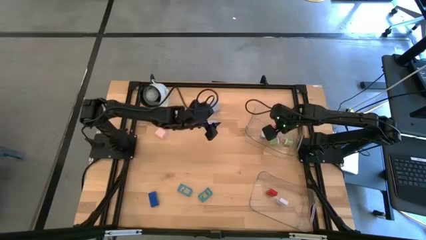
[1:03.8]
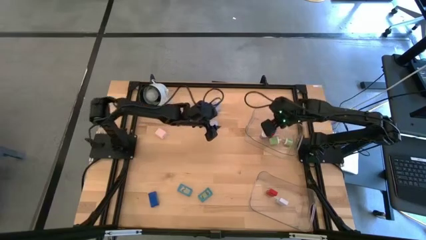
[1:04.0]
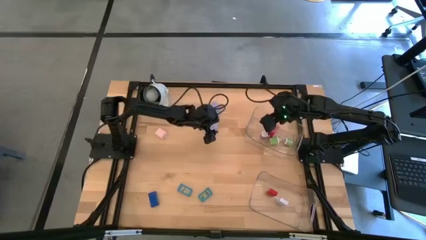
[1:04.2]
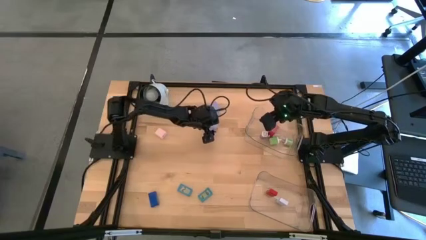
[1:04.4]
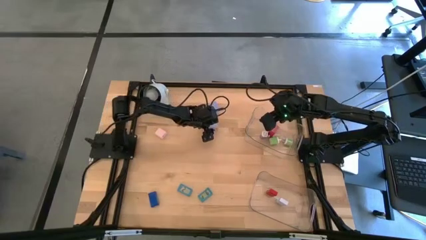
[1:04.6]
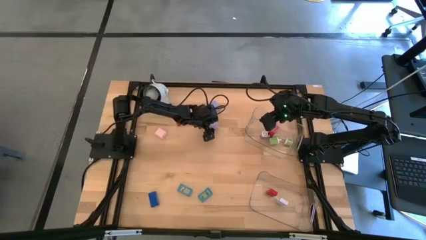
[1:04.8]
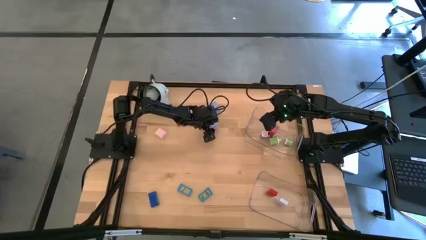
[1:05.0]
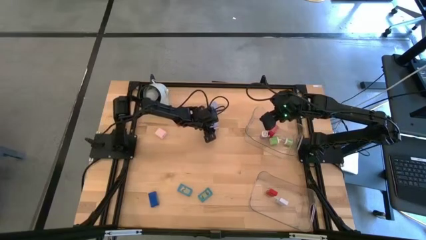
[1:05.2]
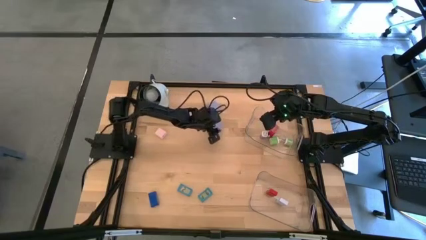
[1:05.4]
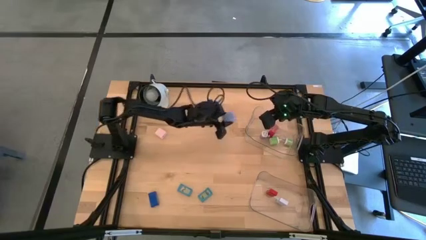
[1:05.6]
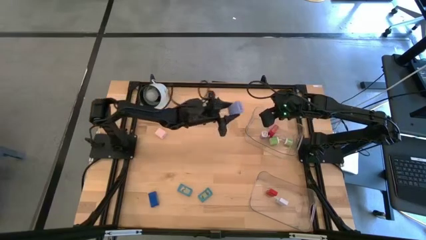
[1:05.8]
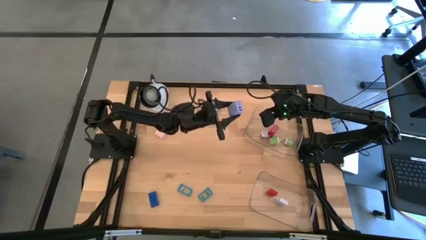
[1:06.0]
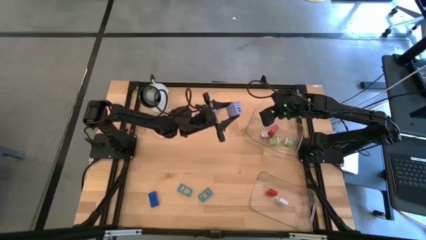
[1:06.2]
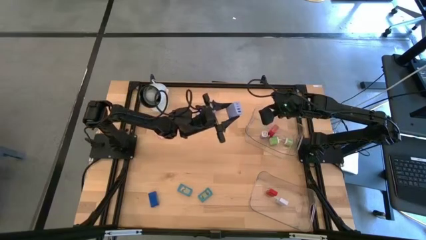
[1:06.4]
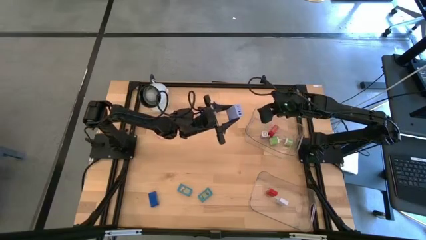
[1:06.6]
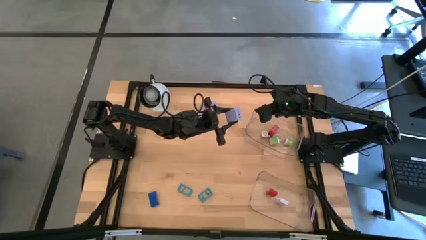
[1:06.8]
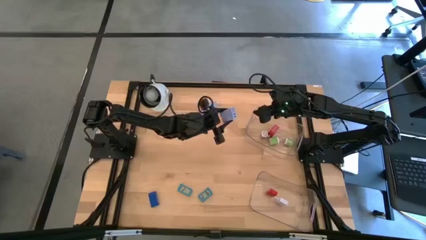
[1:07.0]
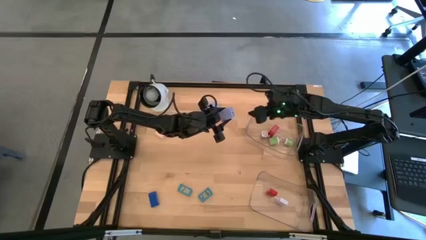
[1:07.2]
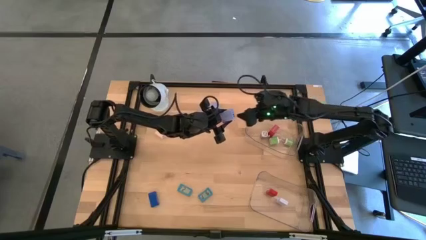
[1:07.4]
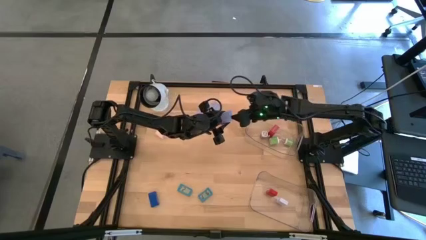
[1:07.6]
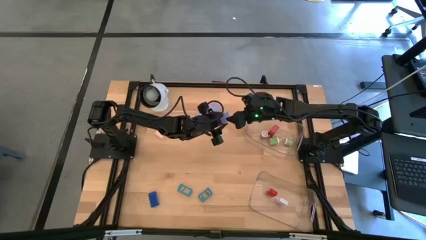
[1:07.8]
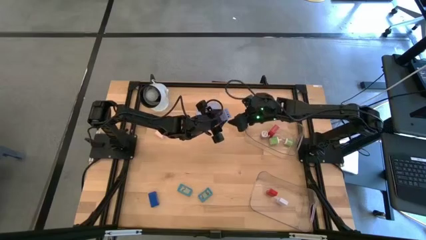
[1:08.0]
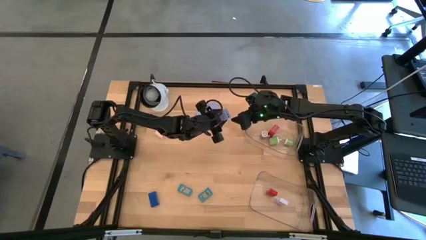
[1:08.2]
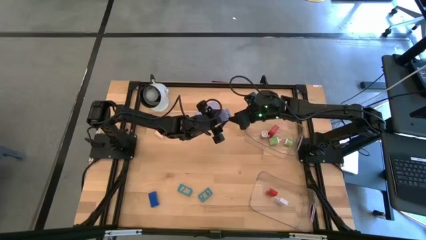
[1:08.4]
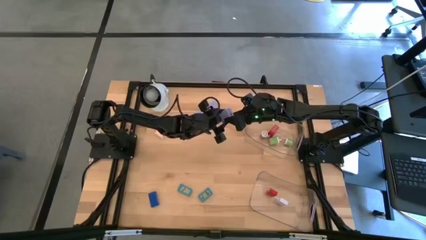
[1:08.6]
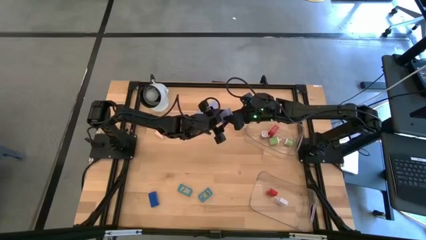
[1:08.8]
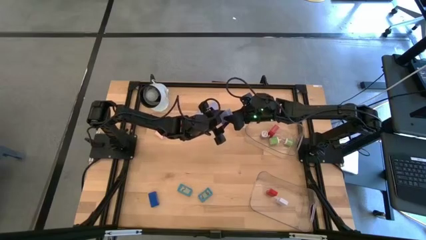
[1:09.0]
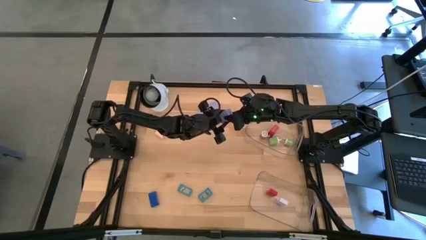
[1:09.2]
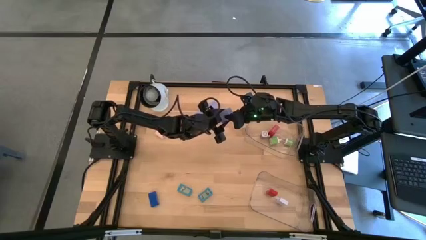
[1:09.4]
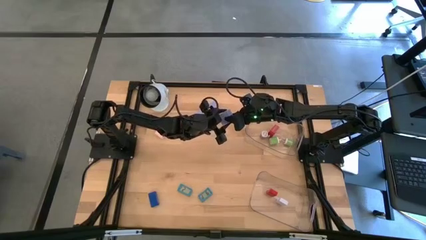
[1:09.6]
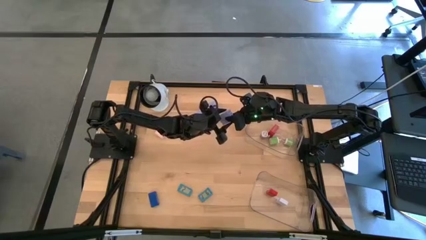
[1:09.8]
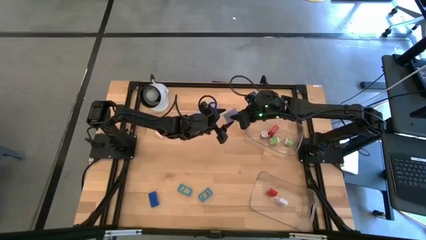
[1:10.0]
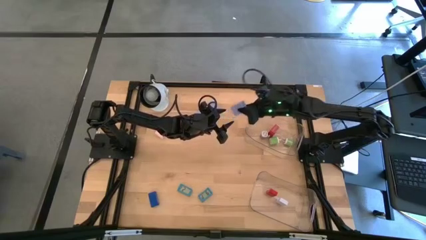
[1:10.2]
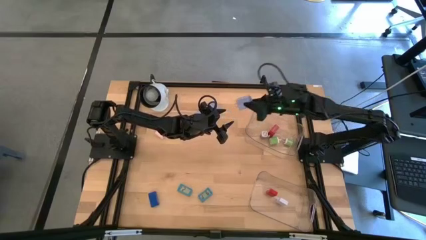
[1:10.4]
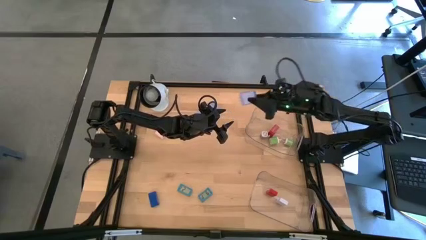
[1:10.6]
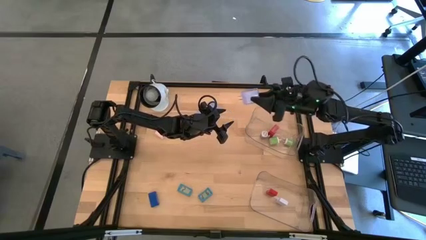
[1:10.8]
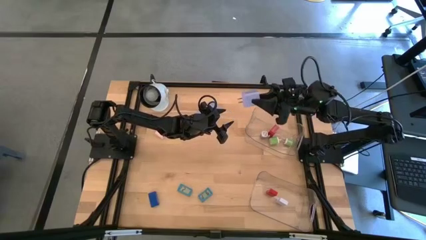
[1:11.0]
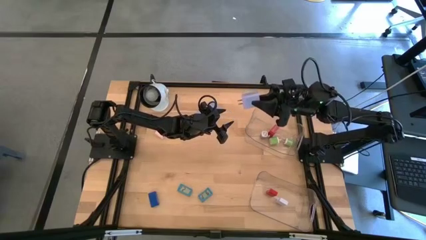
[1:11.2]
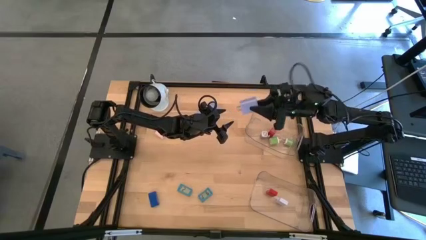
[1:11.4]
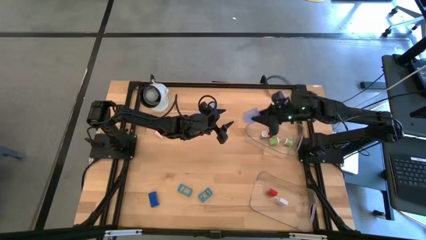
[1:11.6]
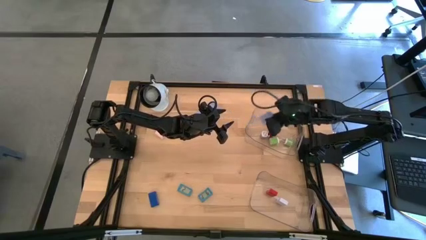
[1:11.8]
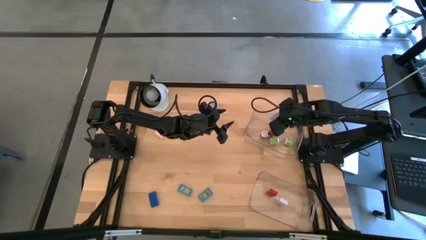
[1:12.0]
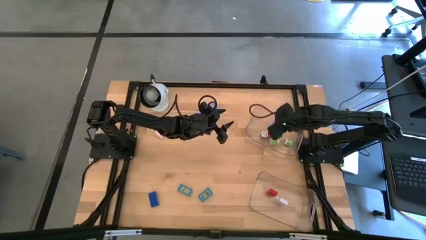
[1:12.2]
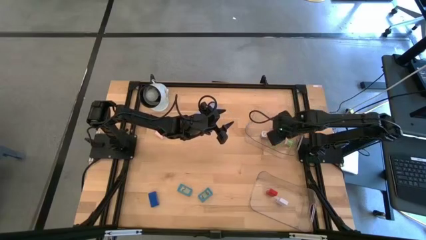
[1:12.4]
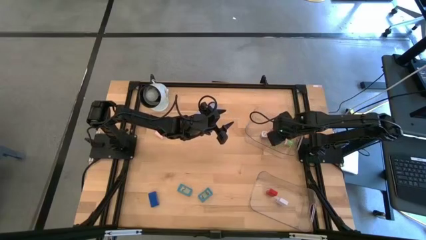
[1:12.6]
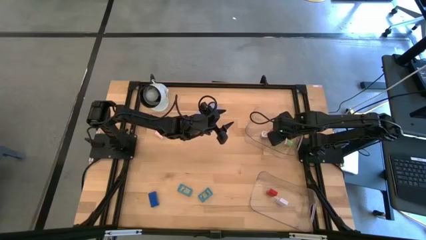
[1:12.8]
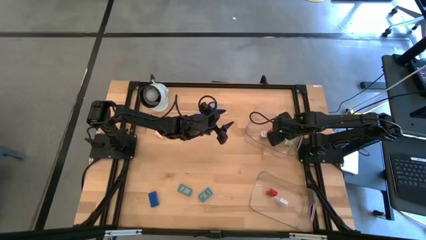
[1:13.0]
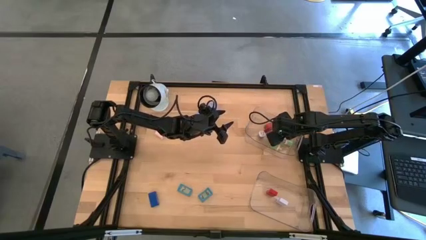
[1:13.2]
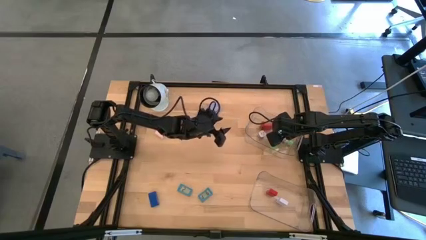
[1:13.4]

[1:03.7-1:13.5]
Task: Pick & Place Office items
Put the bottom blue charger adapter into the top transparent bin

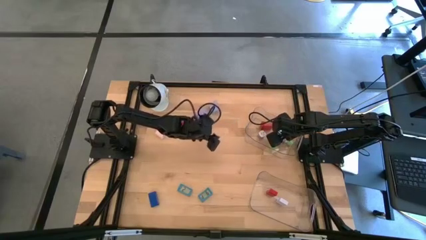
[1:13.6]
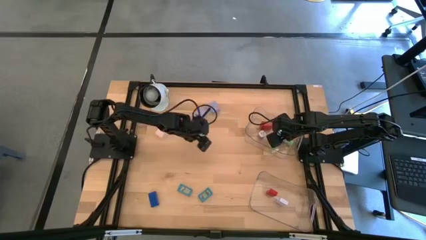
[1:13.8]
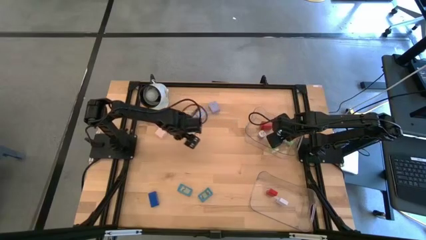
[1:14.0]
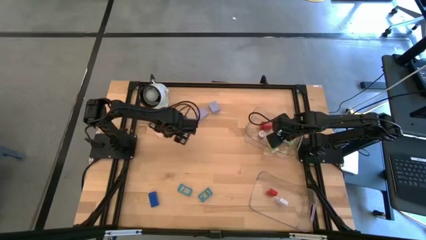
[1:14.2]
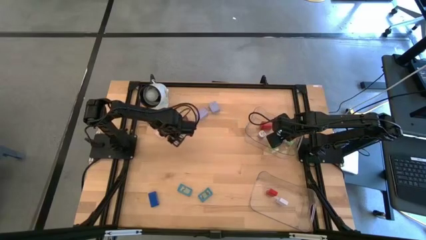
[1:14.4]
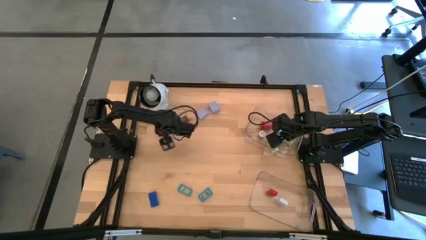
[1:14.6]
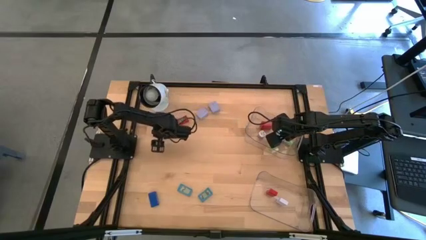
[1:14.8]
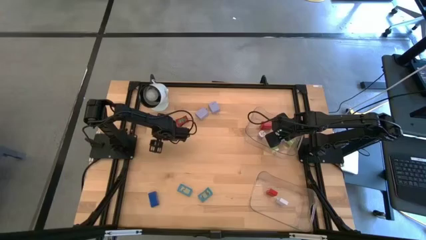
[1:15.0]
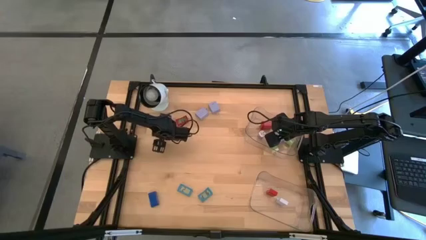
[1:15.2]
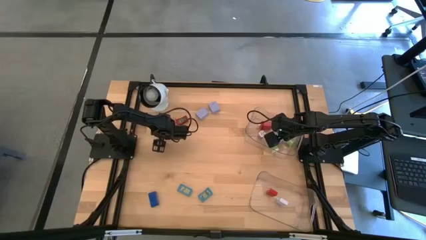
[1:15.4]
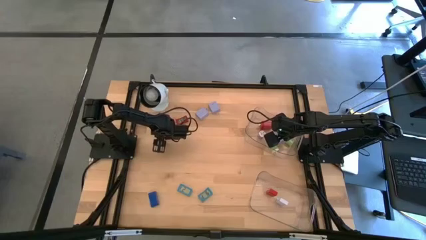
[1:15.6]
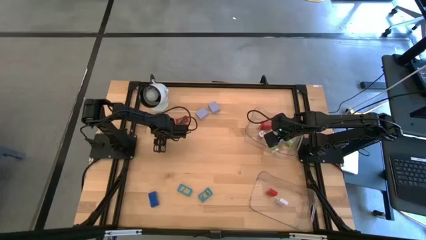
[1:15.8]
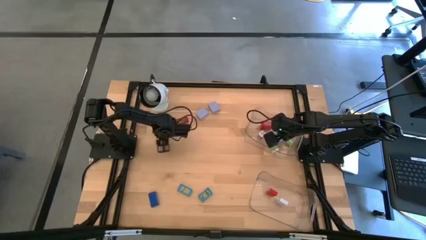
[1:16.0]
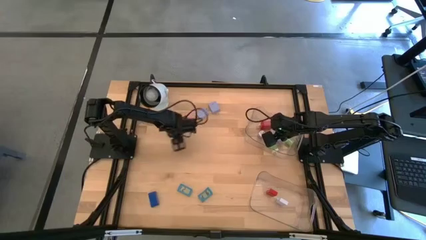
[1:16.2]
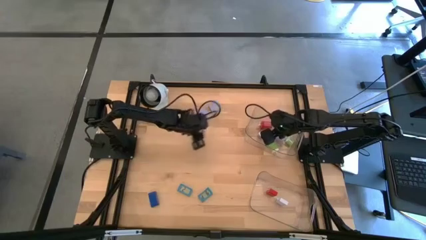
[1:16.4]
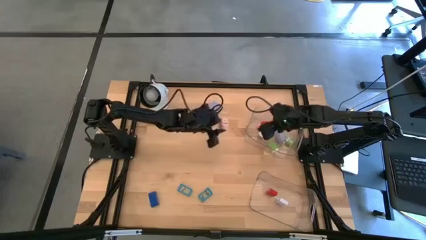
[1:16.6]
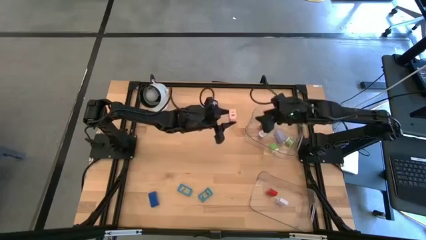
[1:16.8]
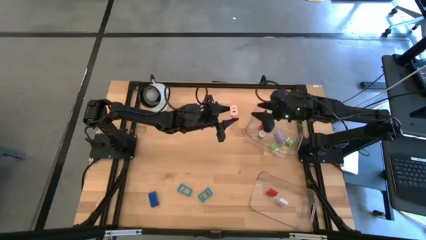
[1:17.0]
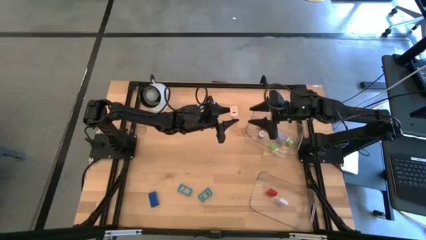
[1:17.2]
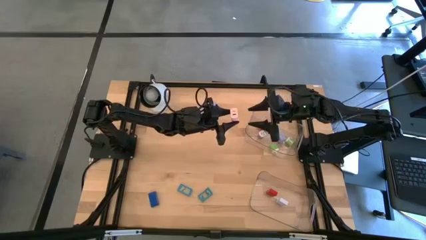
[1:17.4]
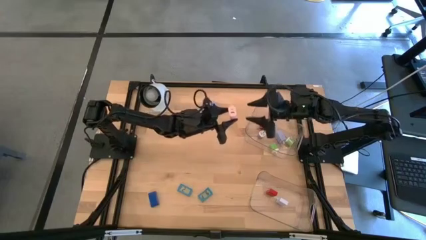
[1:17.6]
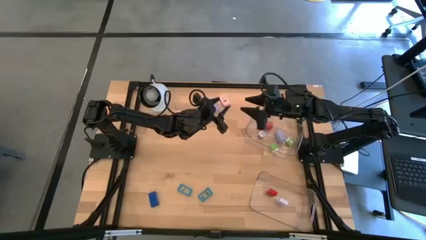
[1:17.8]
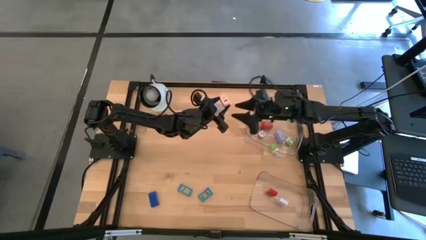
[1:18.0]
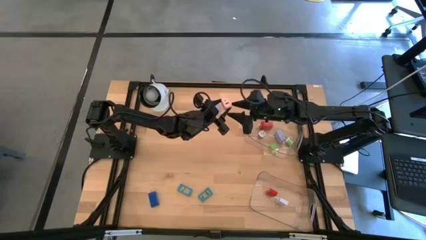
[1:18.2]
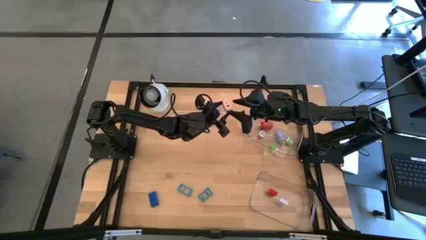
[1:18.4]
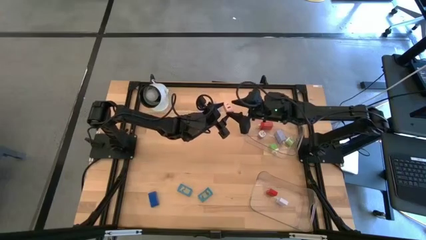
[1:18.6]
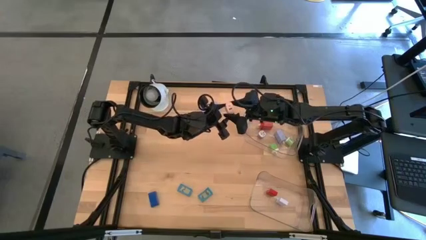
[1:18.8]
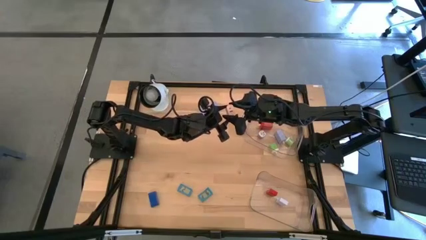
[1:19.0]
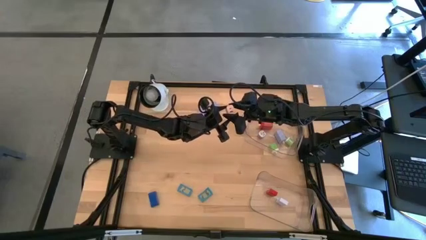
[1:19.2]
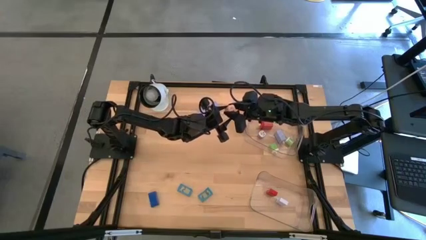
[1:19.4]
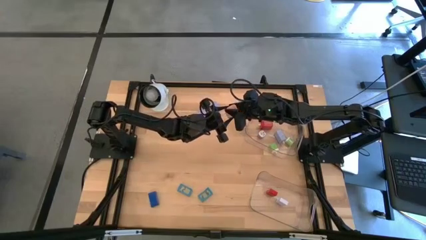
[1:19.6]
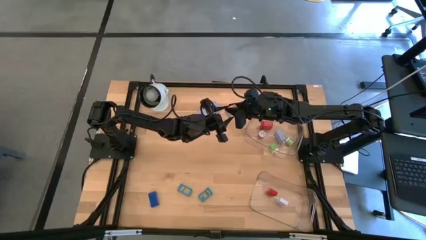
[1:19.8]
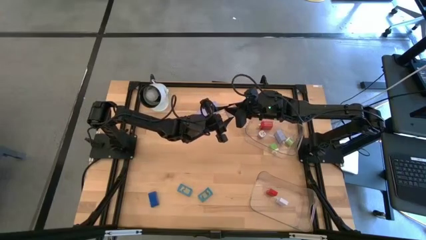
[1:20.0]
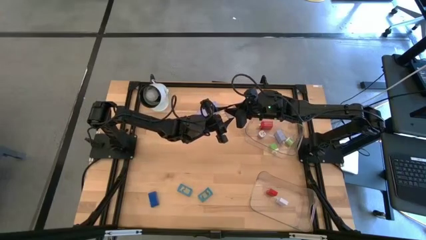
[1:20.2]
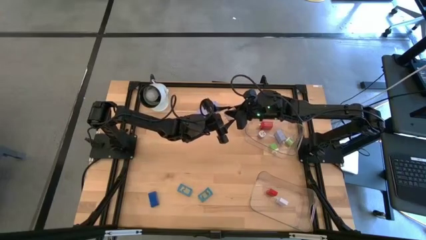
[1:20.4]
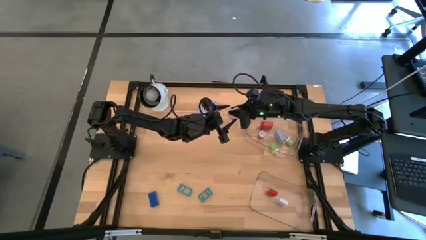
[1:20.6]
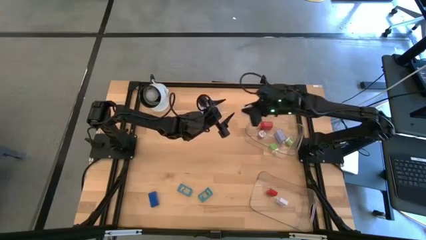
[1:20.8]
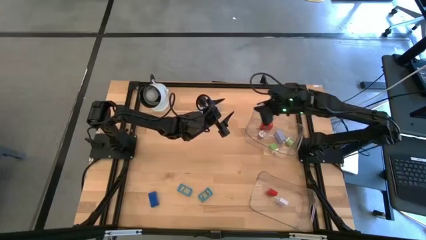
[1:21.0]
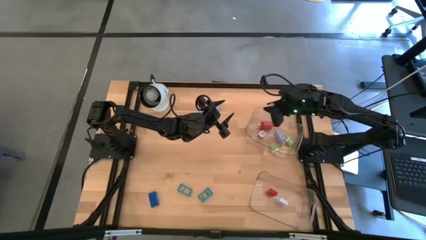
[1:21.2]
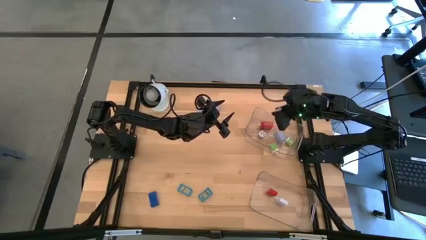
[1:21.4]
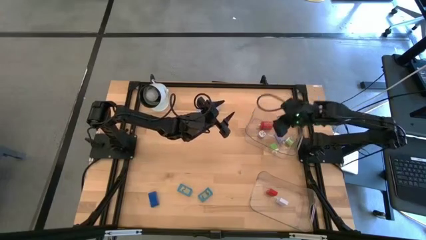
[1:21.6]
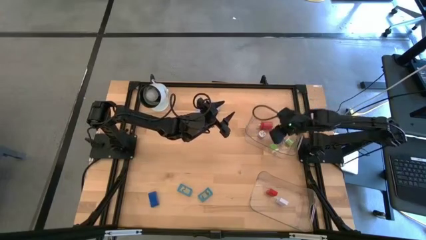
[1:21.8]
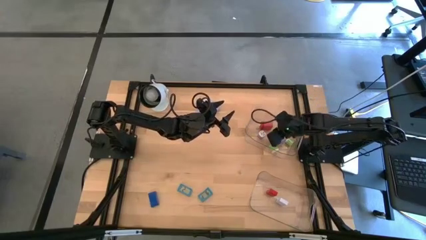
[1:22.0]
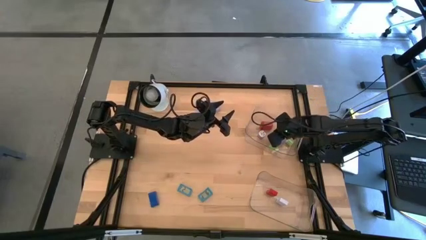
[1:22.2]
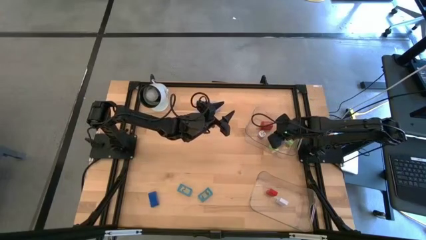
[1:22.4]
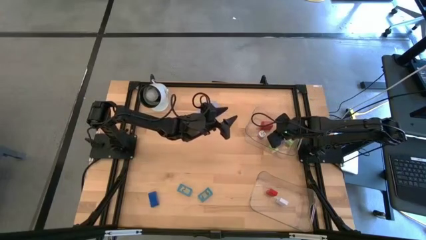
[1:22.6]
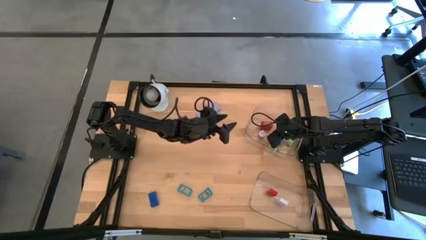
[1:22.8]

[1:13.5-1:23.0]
Put the pink charger adapter into the top transparent bin
